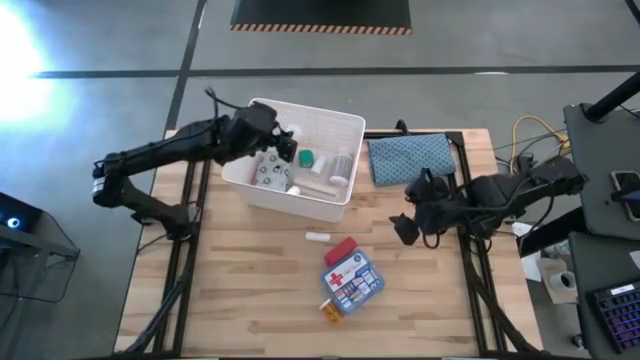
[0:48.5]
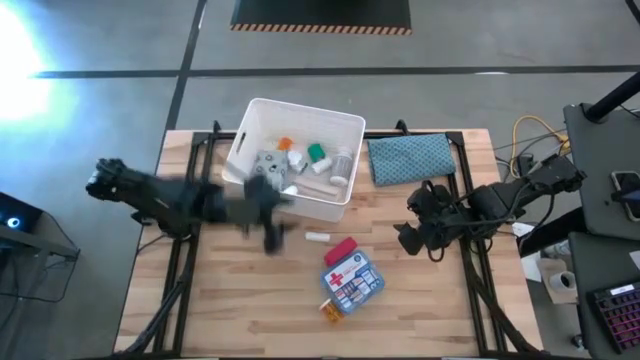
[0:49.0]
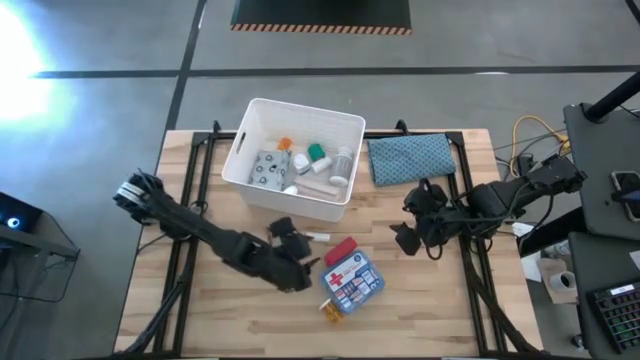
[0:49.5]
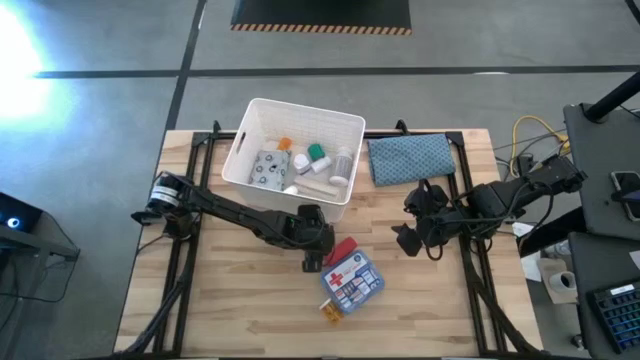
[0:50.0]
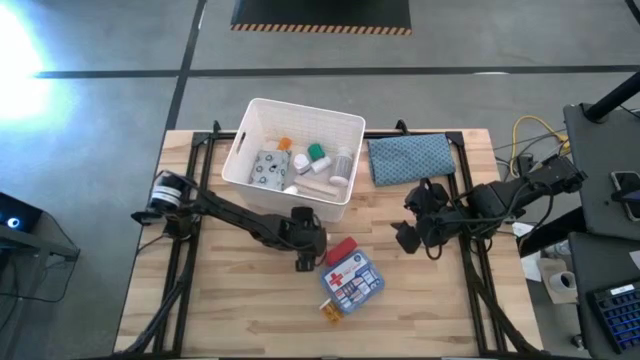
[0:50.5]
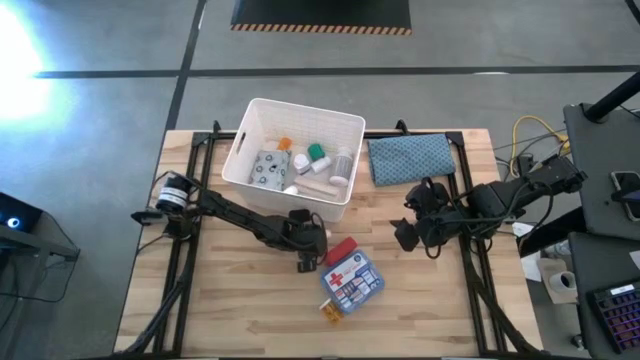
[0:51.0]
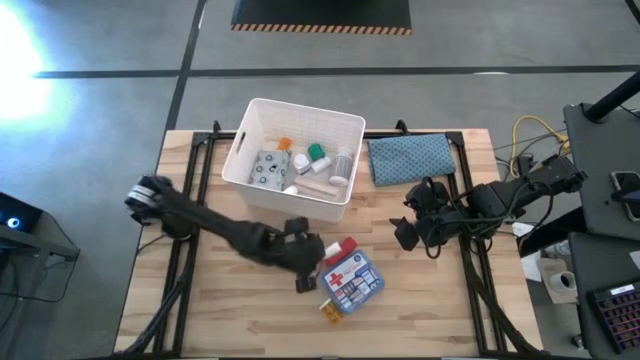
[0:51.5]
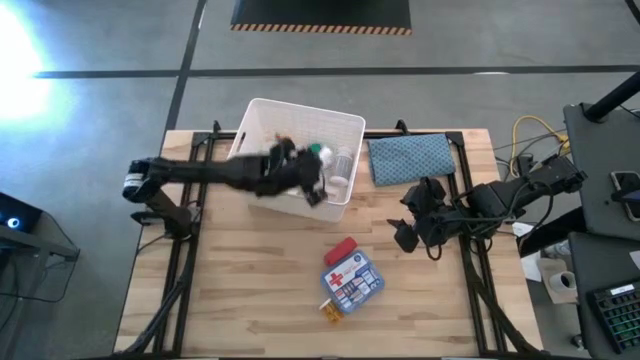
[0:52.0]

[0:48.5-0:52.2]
Task: Pick & place medical supplies in basket/bin
Put the white gauze roll into the white bin

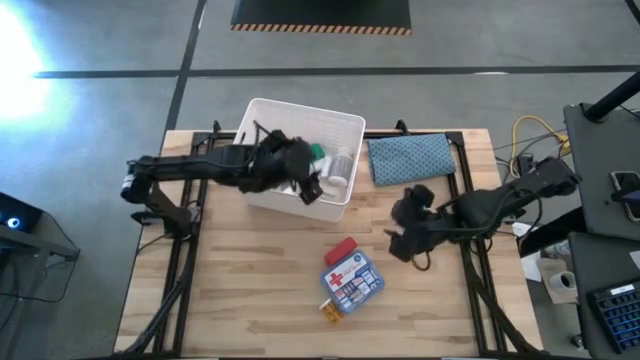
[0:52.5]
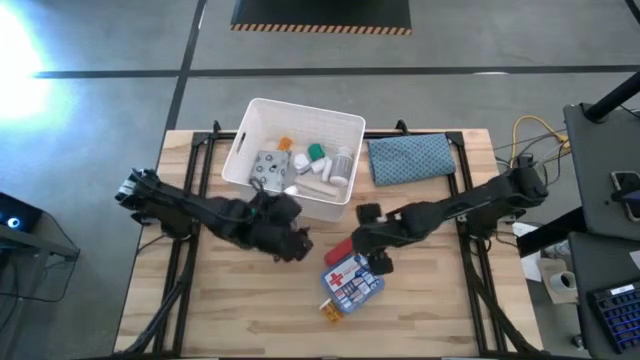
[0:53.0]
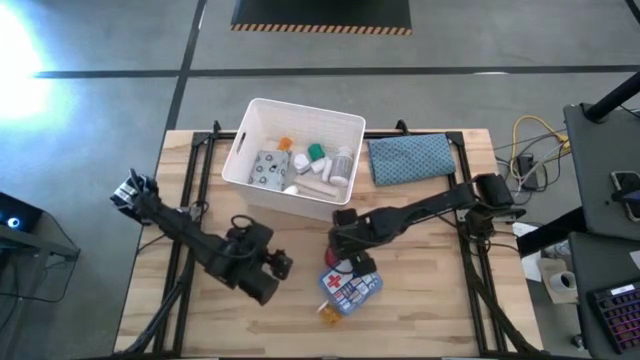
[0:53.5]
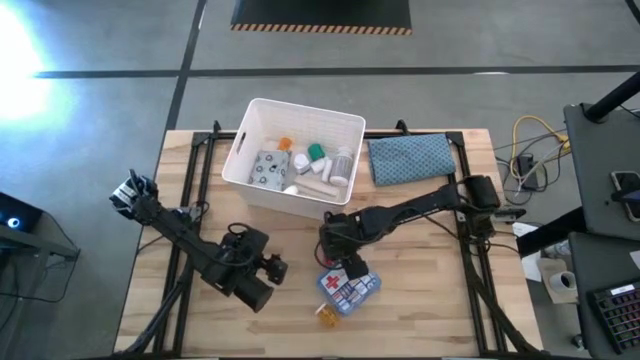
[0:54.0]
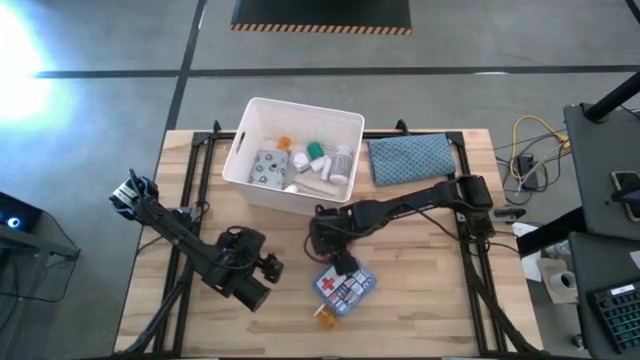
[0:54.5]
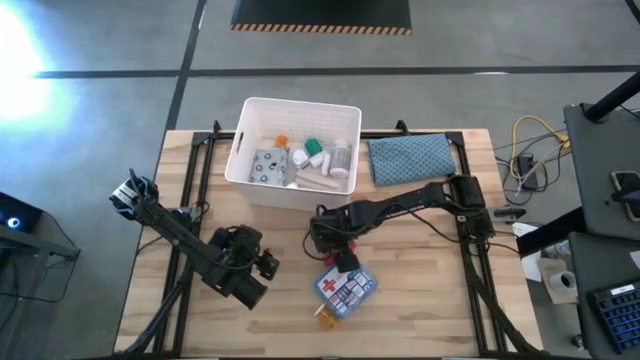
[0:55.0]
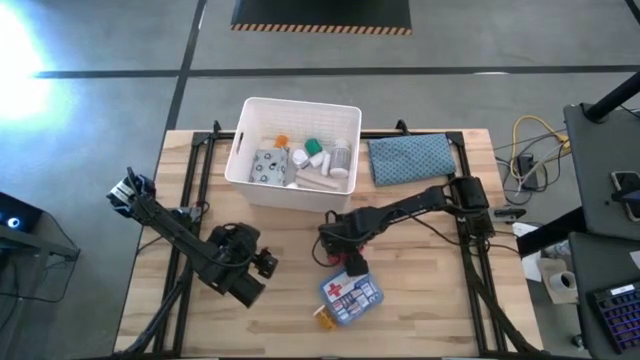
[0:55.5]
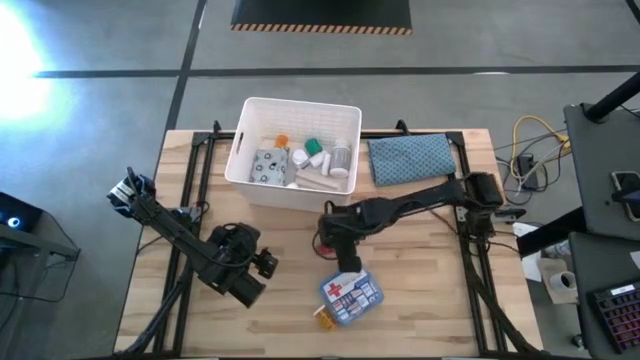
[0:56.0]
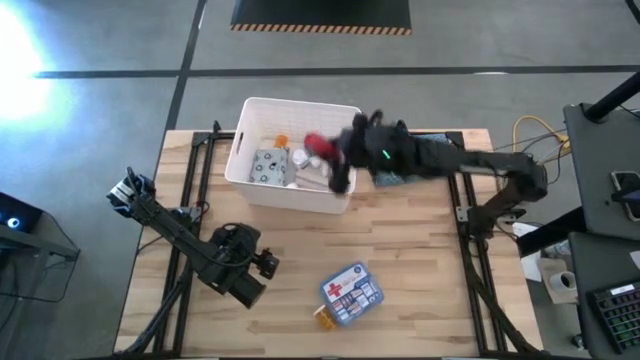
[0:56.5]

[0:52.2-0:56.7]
Put the red bandage roll into the white bin

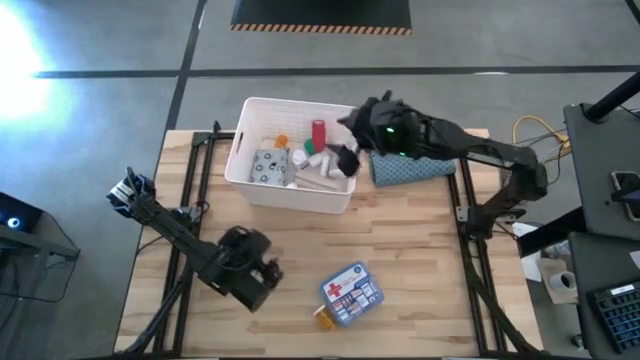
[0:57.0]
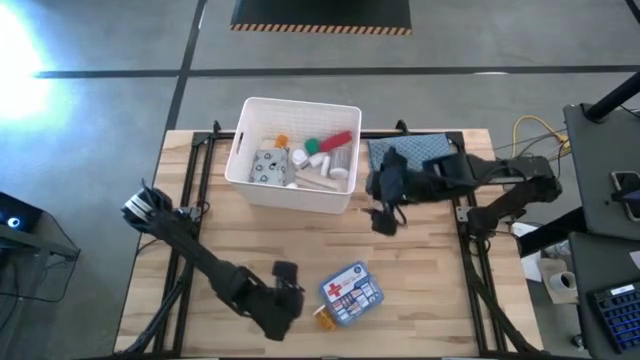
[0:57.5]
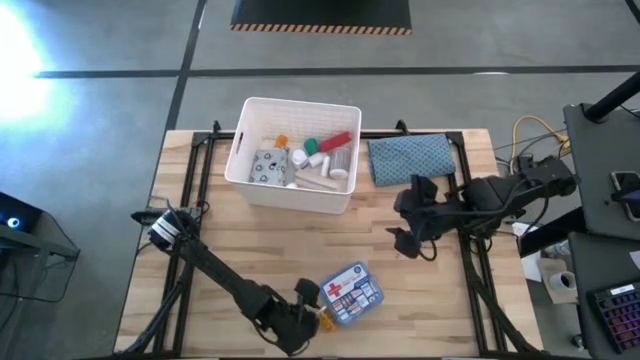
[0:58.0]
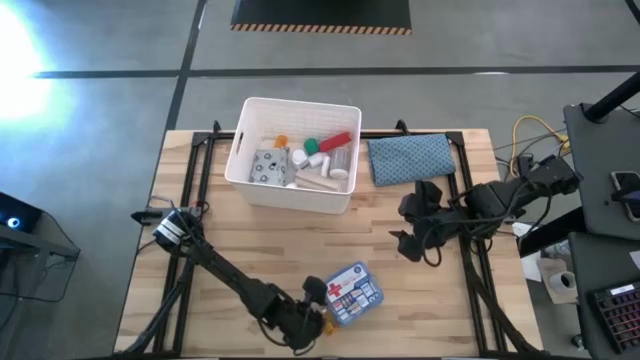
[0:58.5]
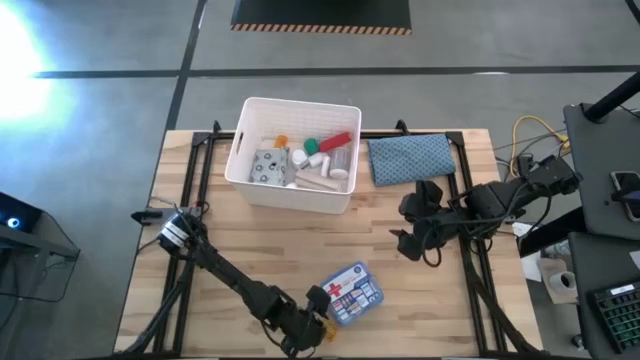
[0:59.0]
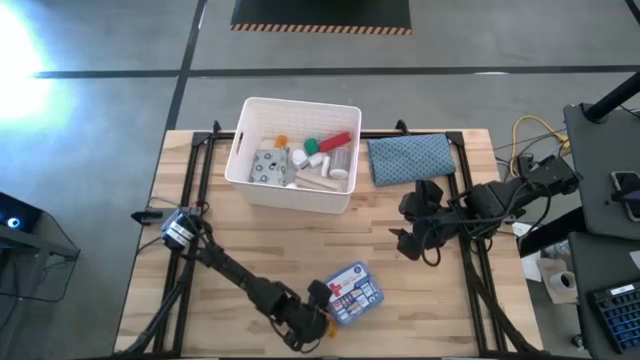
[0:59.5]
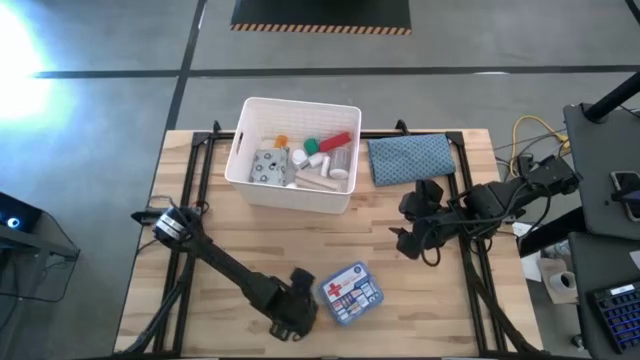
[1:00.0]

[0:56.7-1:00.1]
Put the orange pill bottle into the white bin

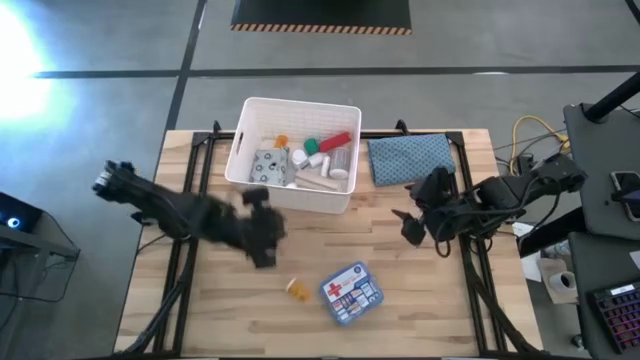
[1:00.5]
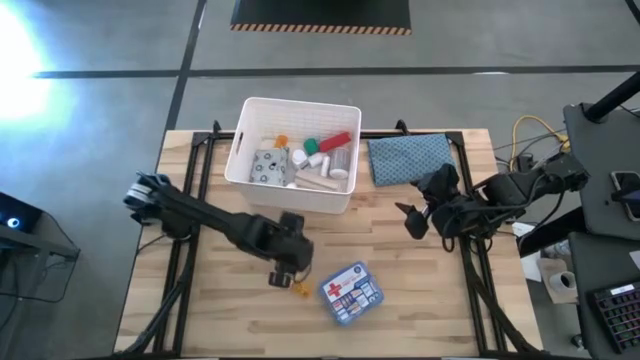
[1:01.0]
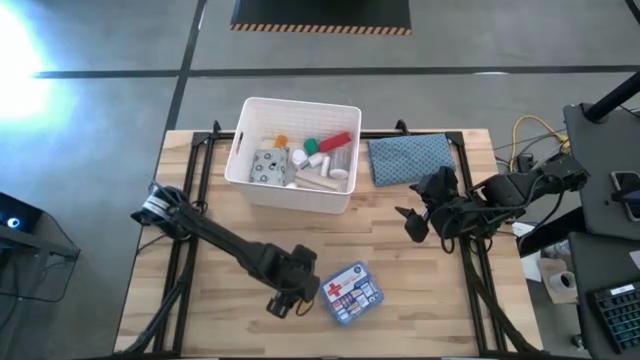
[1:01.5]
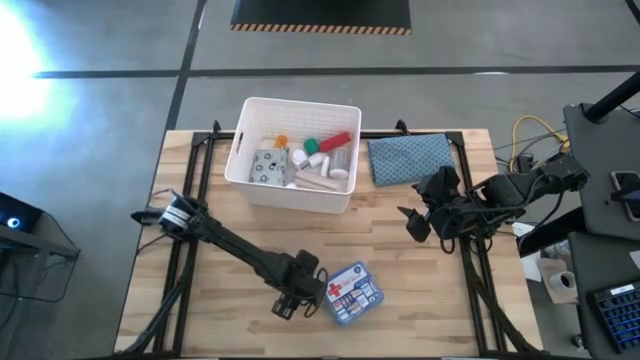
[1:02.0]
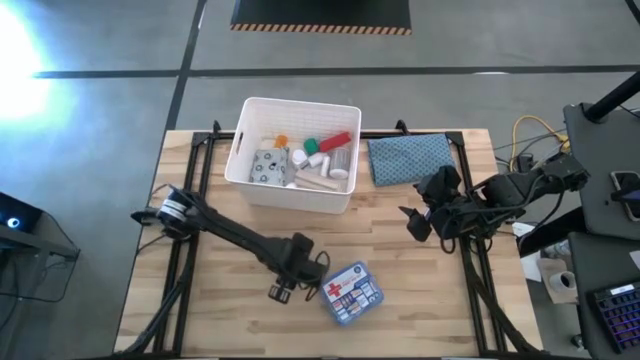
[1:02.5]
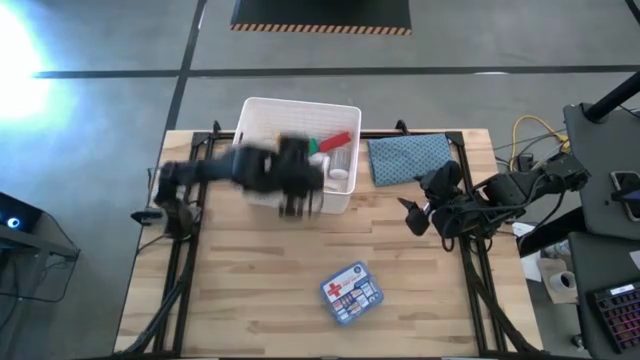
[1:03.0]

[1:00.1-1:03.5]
Put the orange pill bottle into the white bin

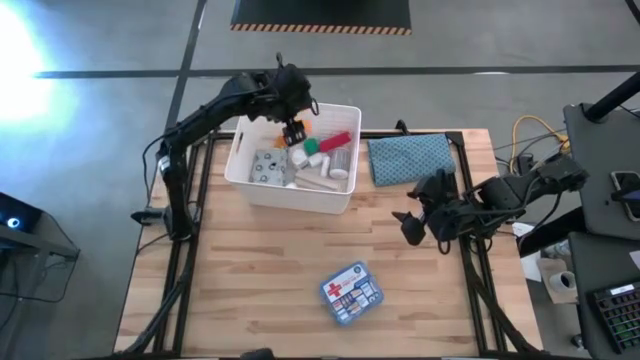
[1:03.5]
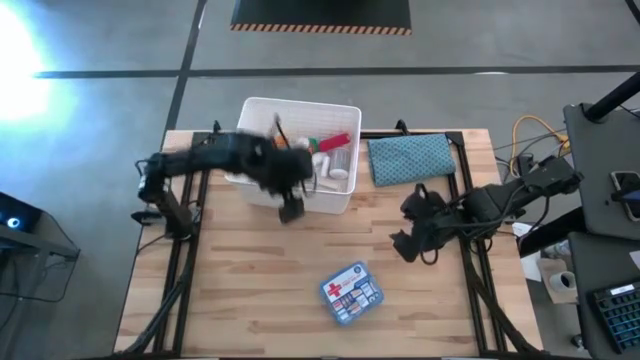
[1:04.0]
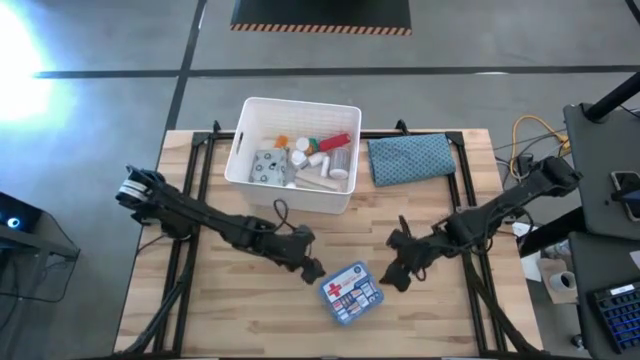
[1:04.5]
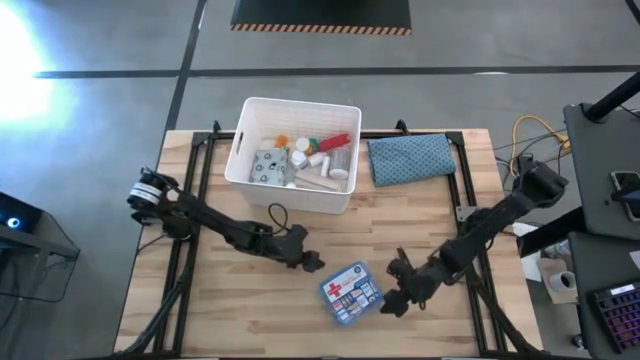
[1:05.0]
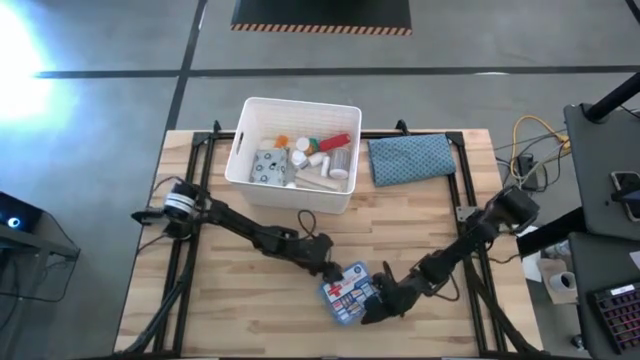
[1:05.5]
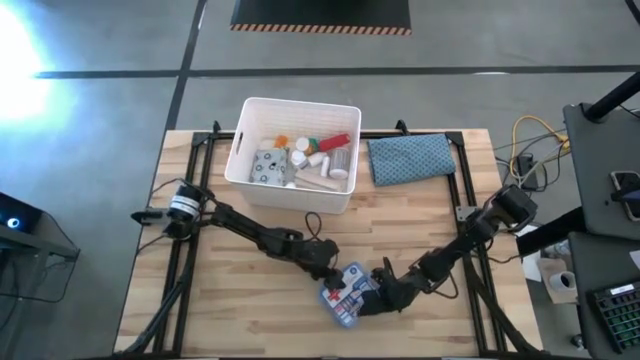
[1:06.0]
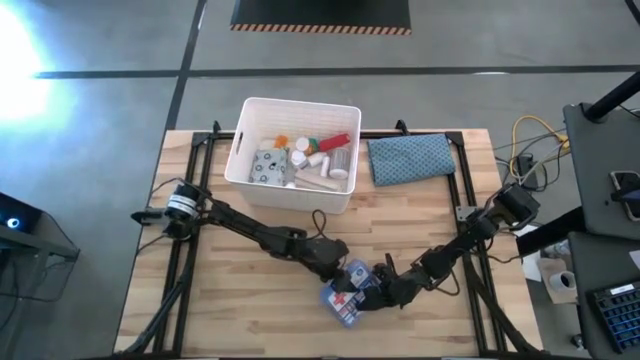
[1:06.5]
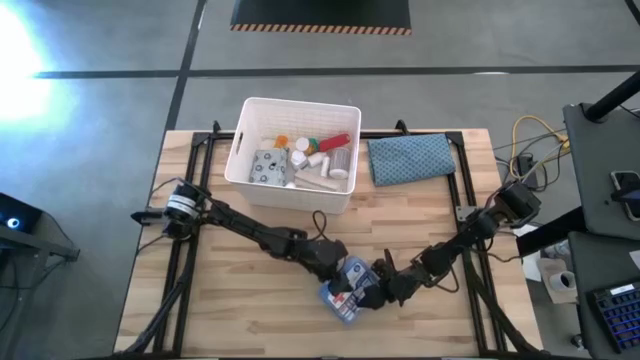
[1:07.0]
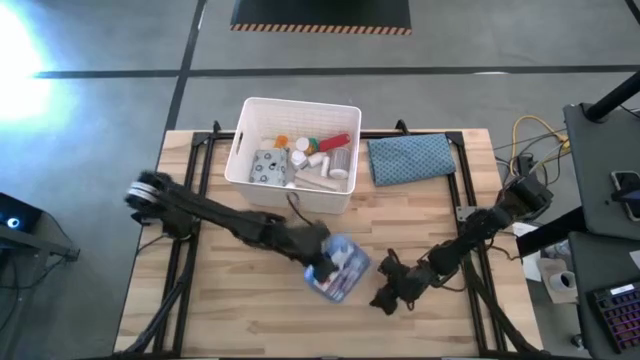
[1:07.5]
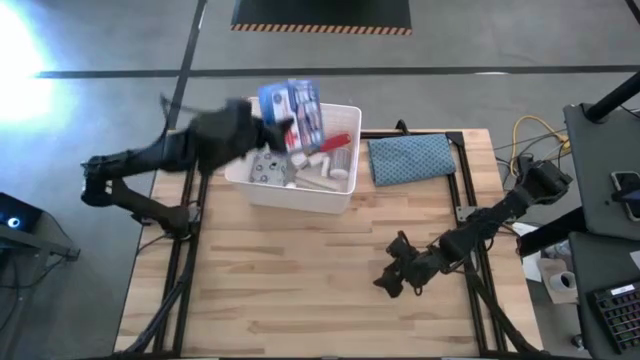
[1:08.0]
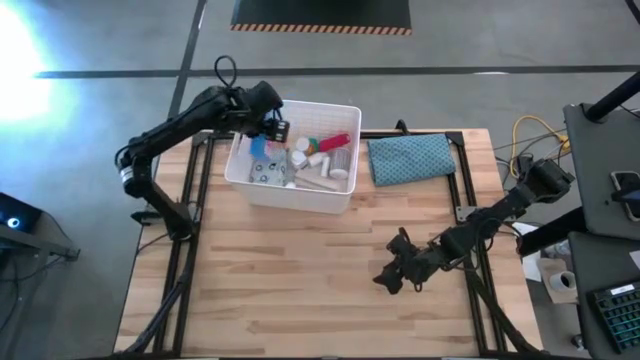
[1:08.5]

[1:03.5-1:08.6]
Put the blue first aid kit into the white bin

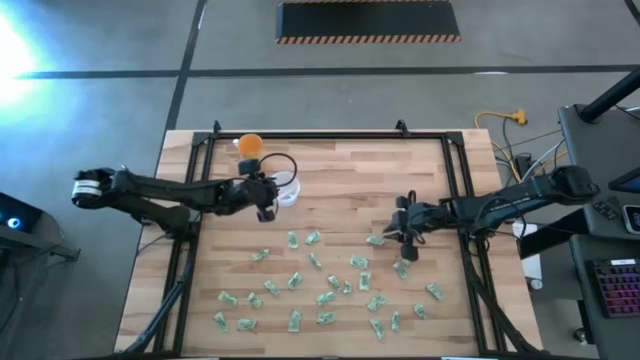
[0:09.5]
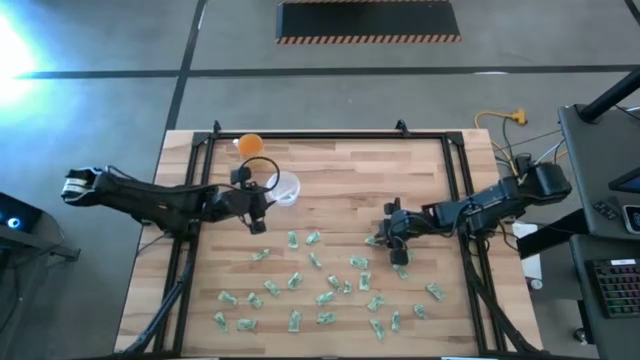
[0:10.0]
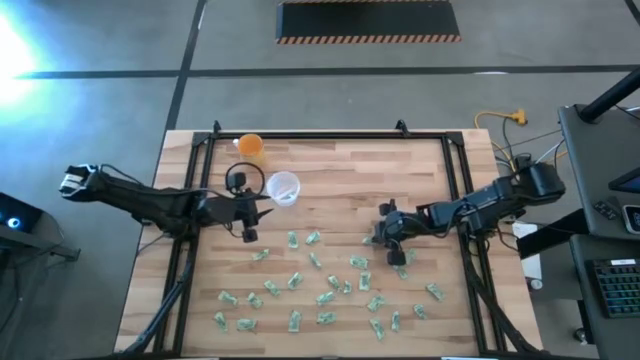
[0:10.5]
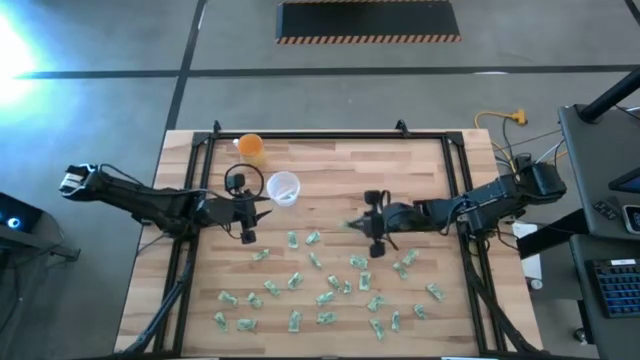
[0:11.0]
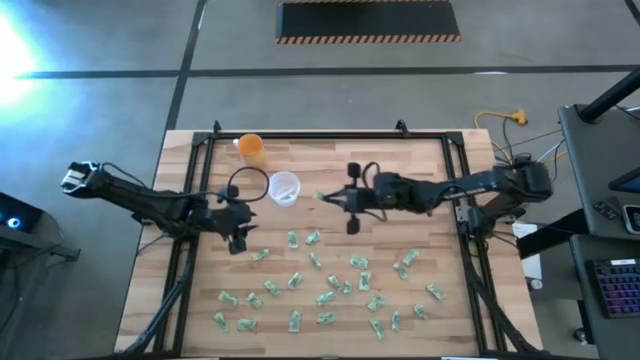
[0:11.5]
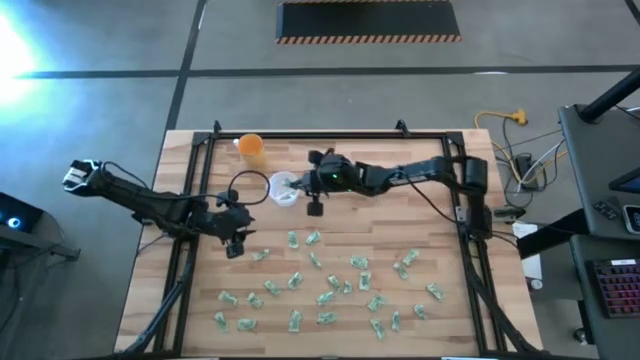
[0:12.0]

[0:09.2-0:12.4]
Task: Pick and place Stevia / Truvia into bins
Put the stevia packet into the transparent container
